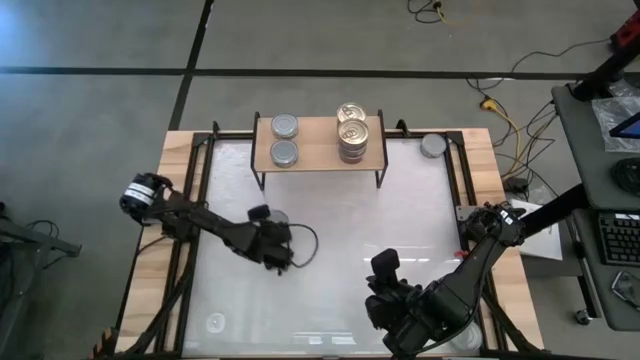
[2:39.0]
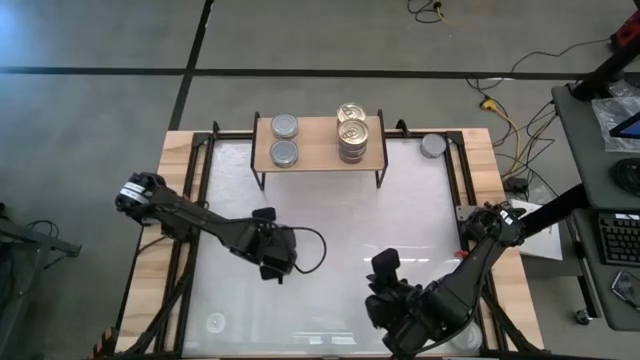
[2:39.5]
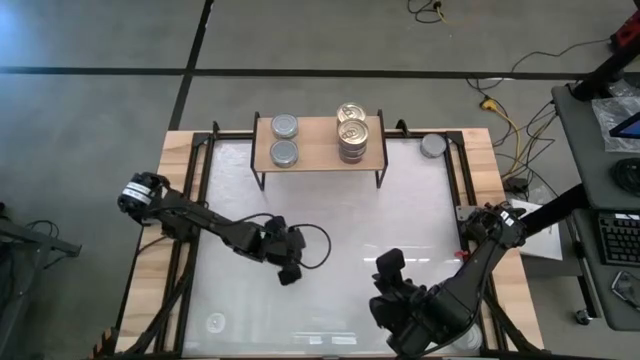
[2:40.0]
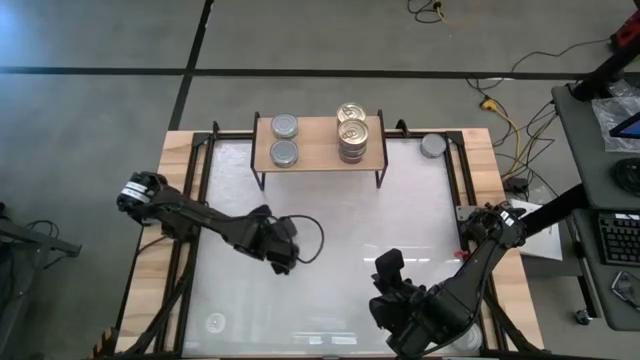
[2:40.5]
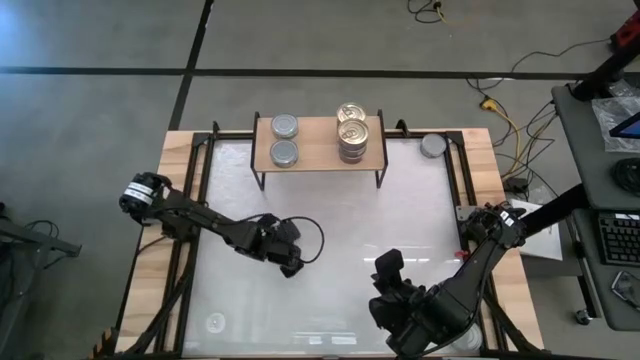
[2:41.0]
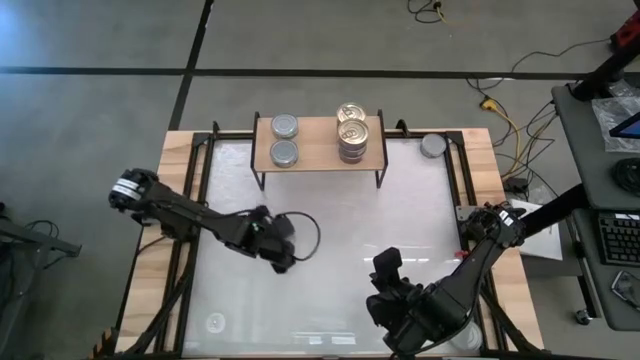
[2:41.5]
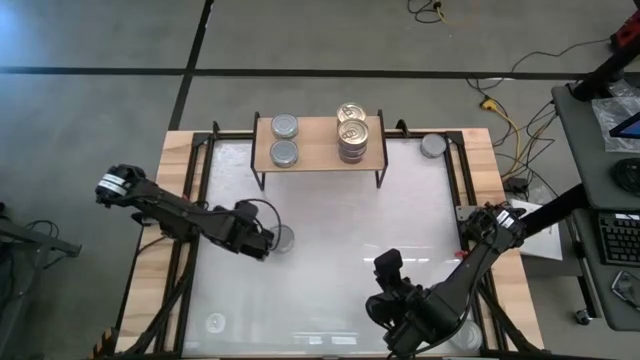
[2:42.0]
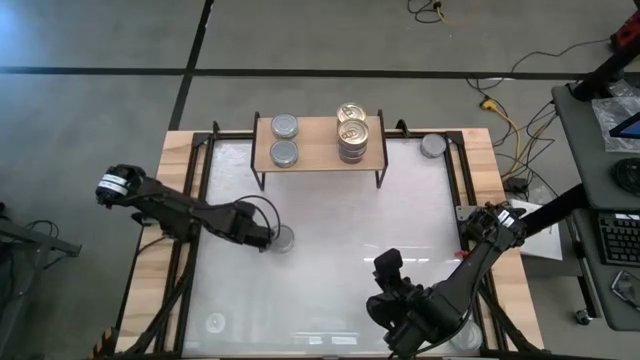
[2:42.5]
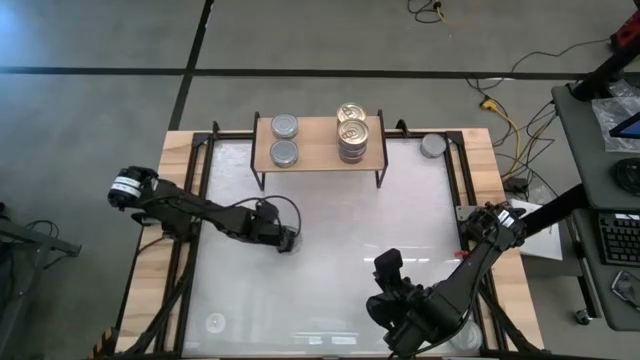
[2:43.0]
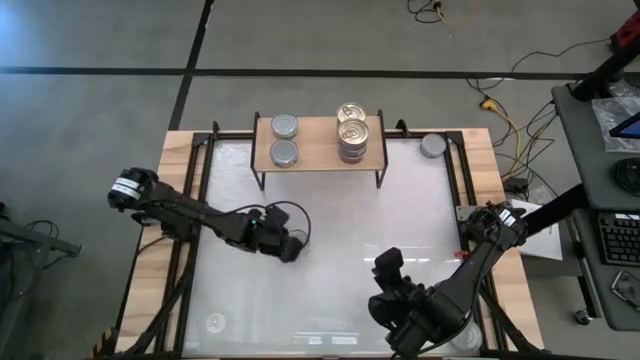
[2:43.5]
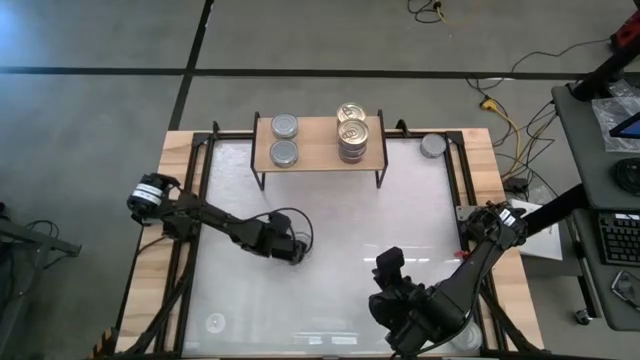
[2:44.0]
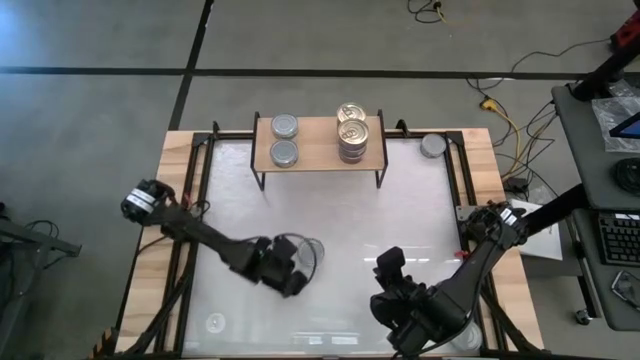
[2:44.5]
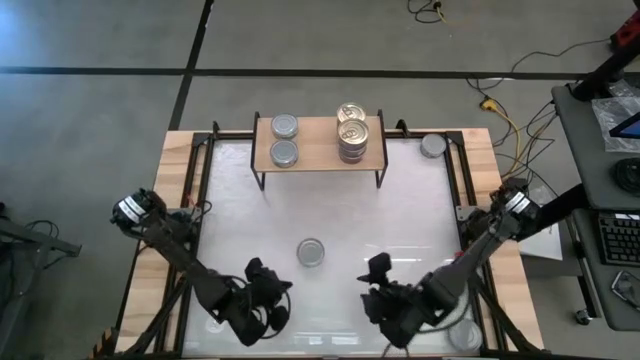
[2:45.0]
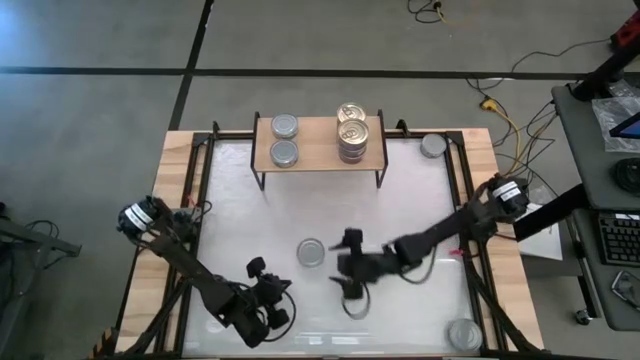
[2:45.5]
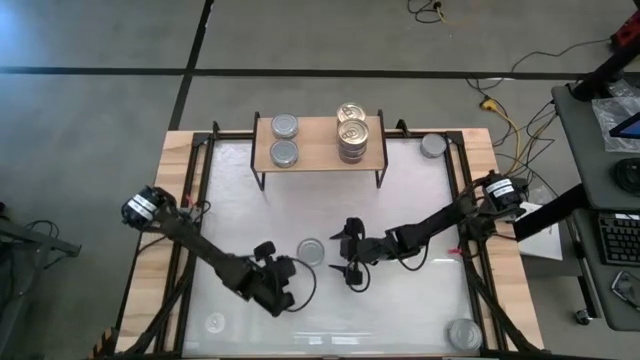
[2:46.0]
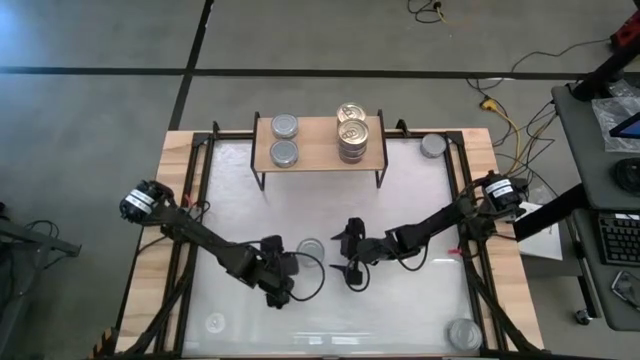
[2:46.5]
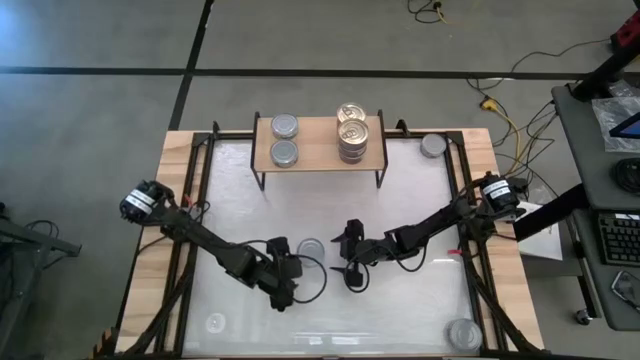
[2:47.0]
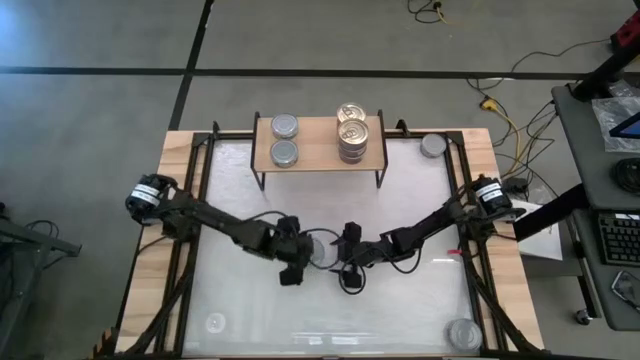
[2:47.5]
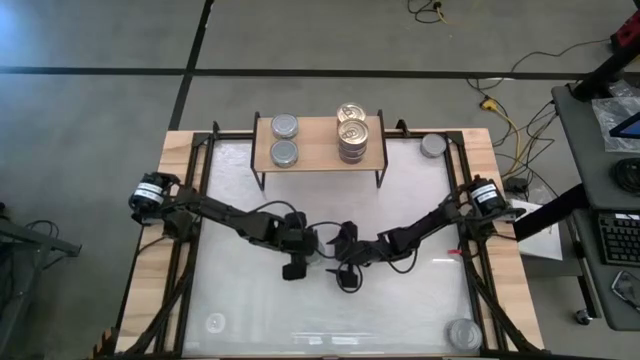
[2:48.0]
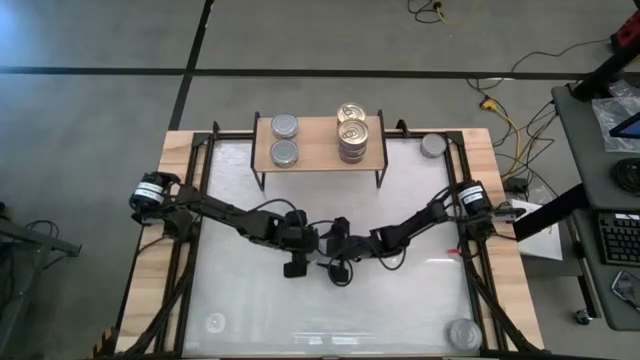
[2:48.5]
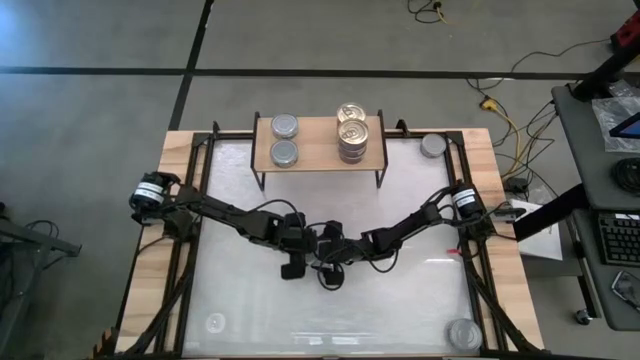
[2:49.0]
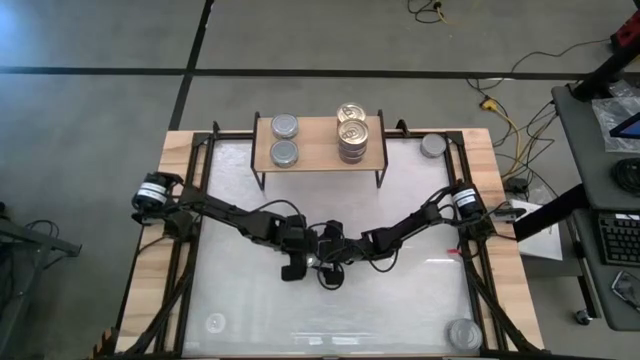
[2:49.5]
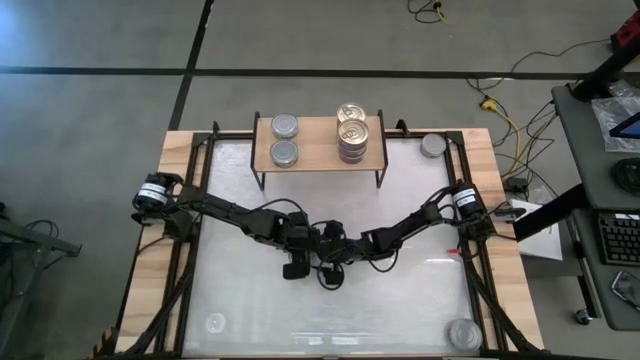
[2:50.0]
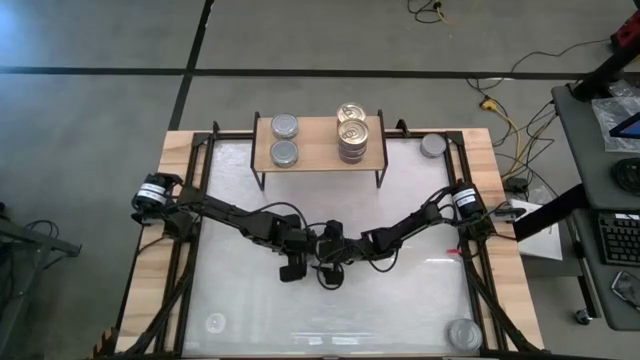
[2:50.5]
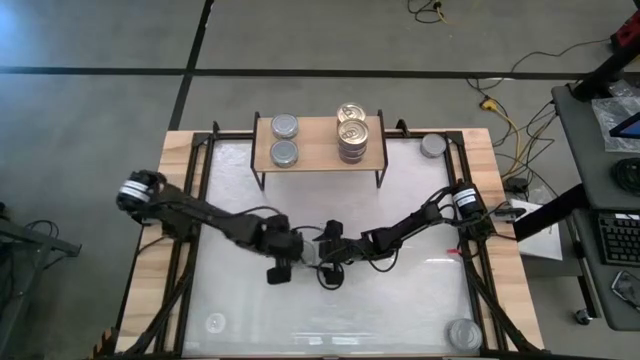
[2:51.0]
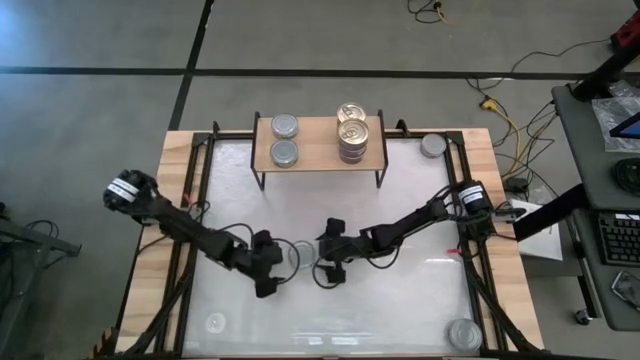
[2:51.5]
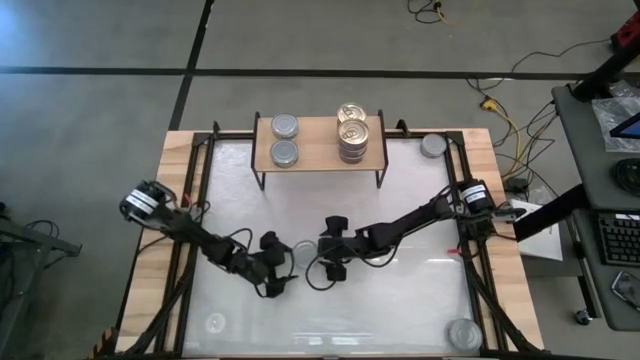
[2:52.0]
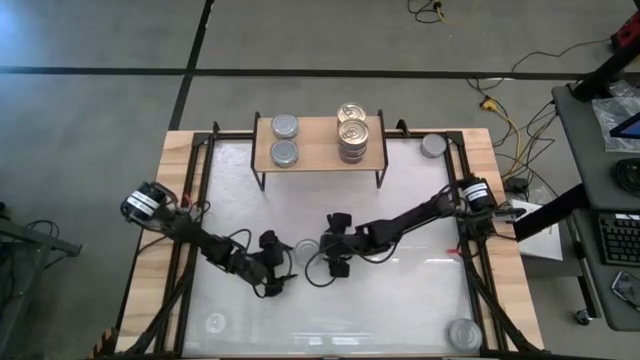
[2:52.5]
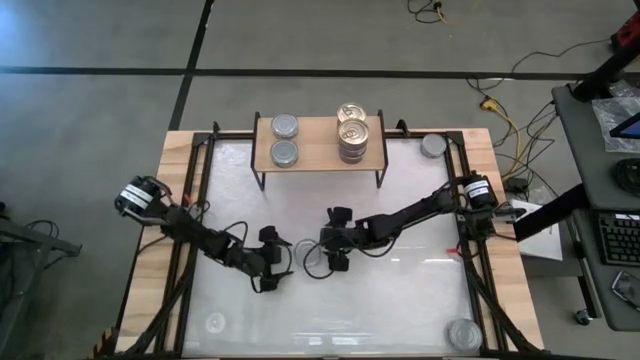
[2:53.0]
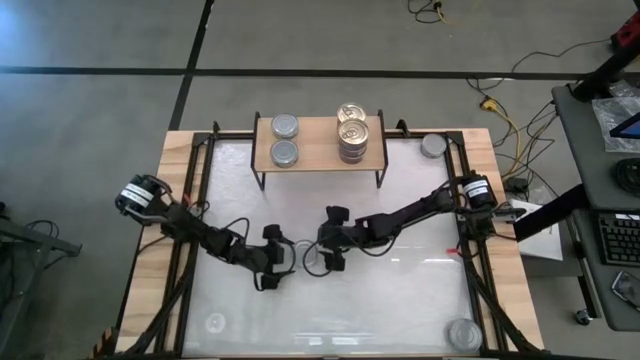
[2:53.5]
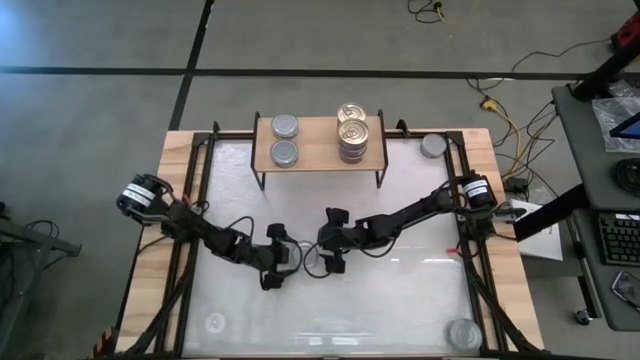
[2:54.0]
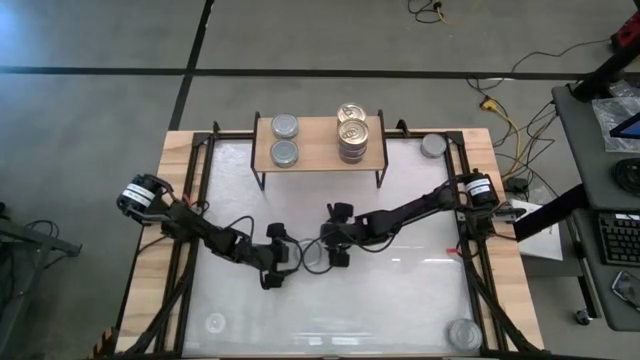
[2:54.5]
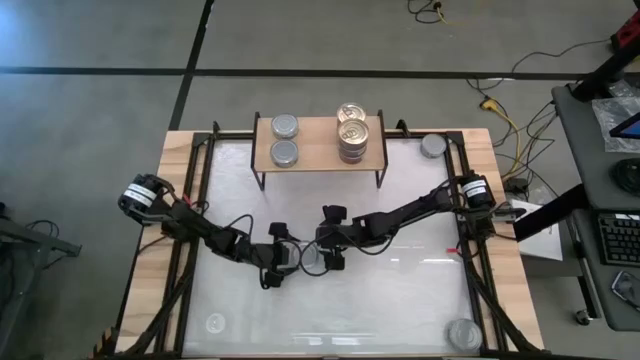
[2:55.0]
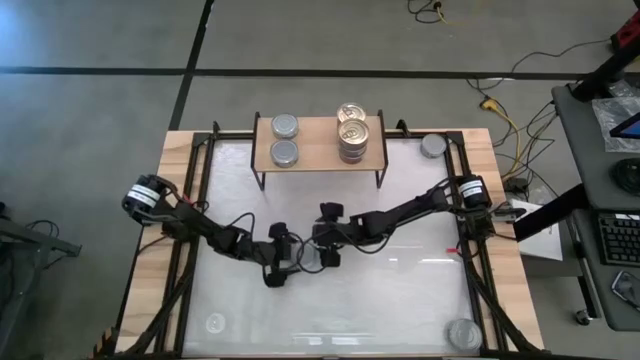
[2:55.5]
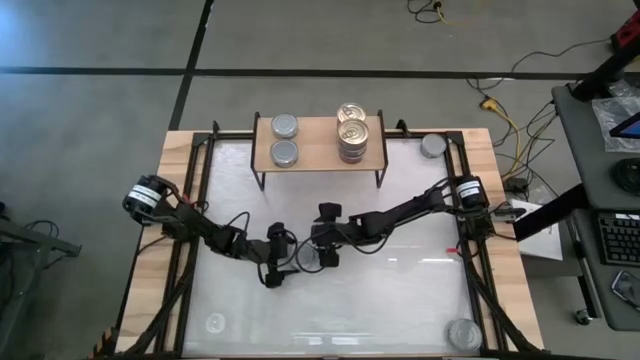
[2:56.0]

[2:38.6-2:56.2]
Task: Stack canned seafood by type on shelf
Stack the green tuna can on top of the other green tuna can on the shelf

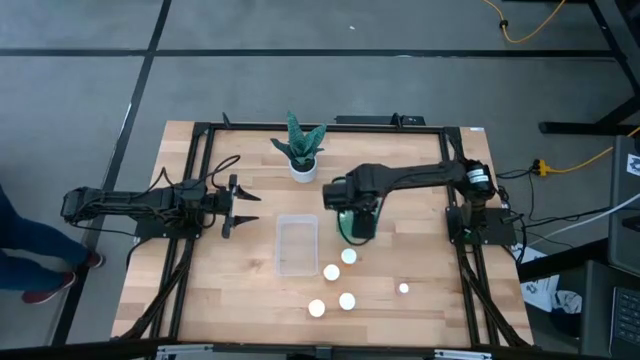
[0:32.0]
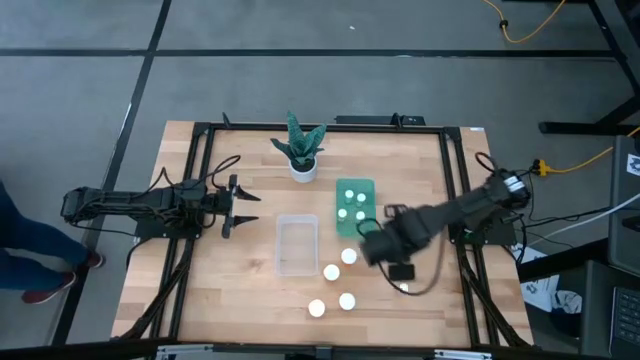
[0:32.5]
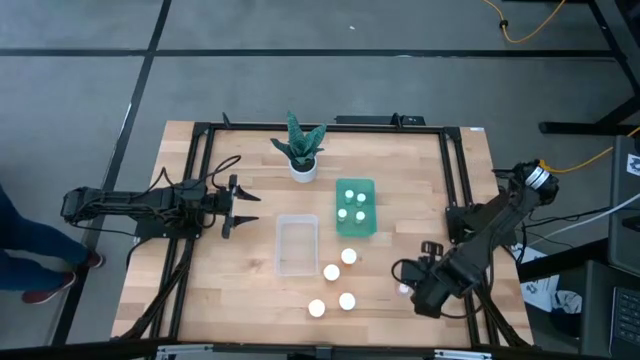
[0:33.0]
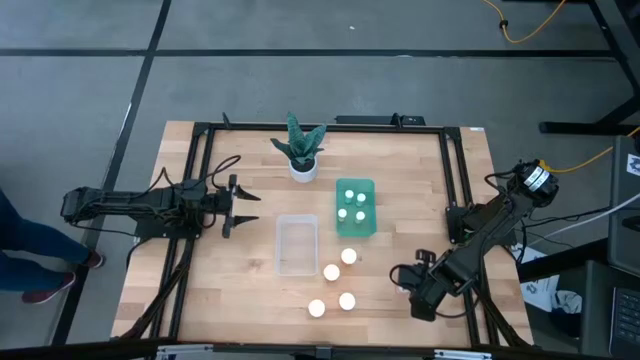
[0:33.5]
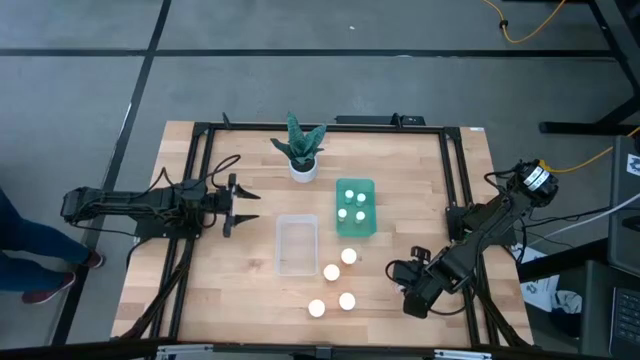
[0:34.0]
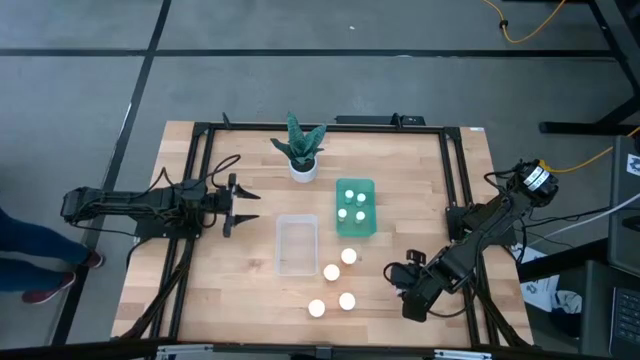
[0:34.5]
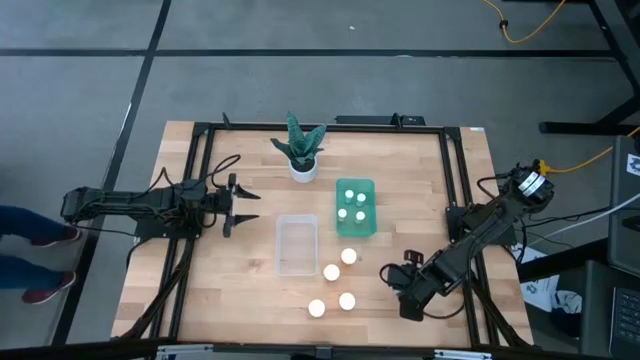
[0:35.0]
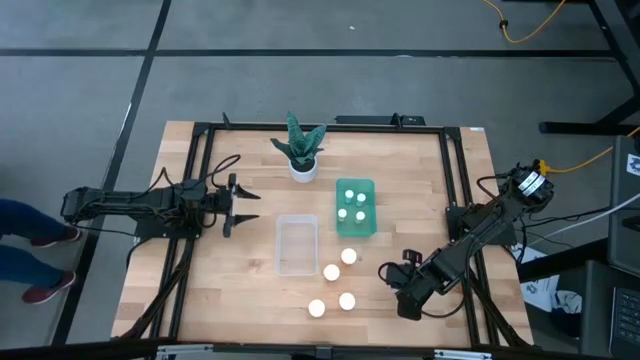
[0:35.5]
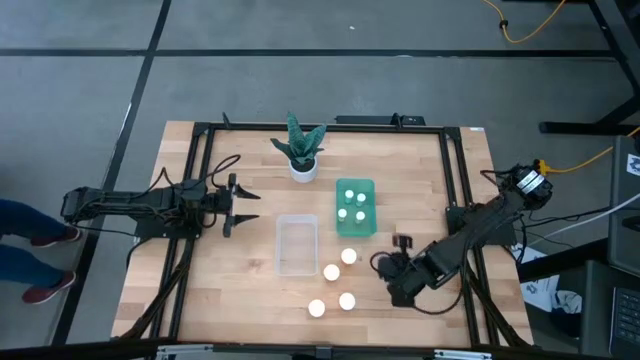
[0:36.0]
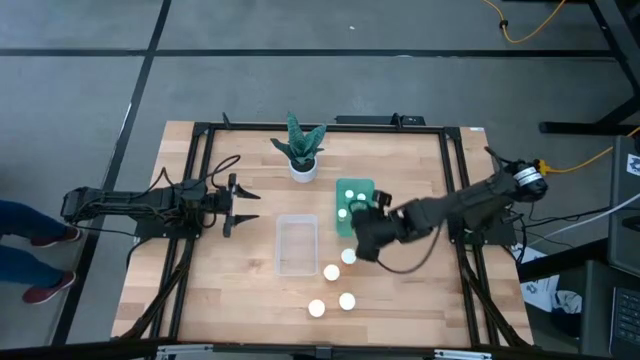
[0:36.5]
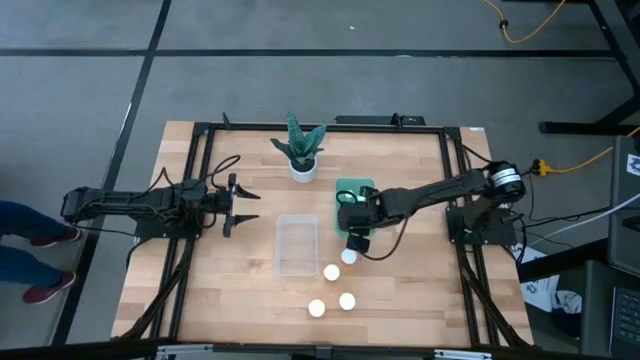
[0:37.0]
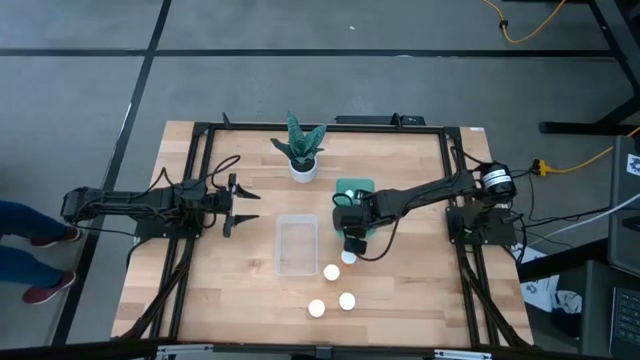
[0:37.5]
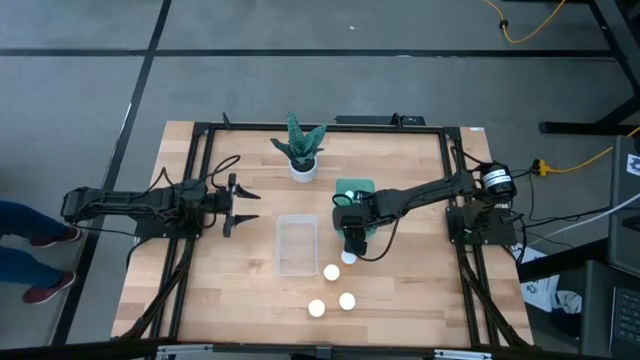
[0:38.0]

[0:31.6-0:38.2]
Task: Pick and place medicine bottles into bin by pill shape (circle, oval)
Put the small pink pill bottle into the green bin
